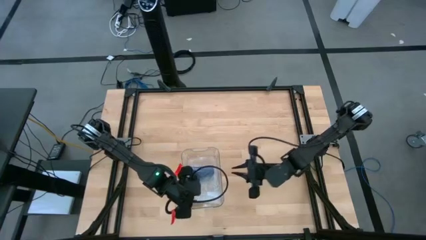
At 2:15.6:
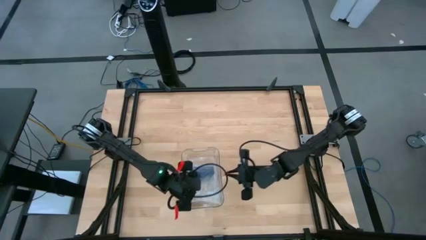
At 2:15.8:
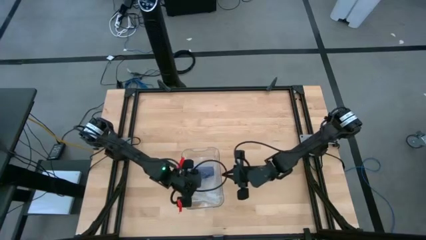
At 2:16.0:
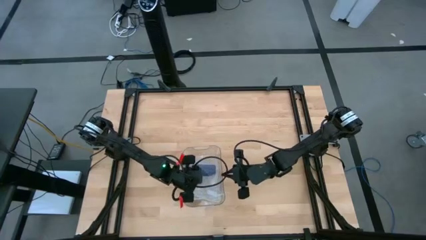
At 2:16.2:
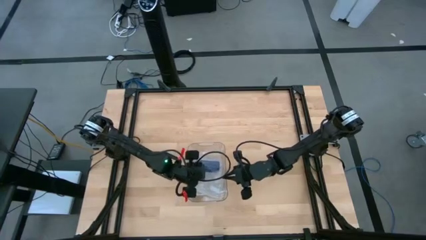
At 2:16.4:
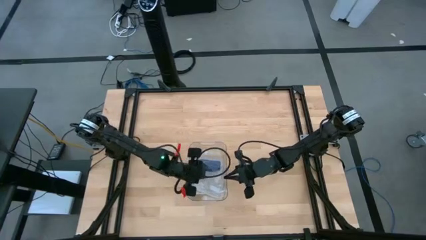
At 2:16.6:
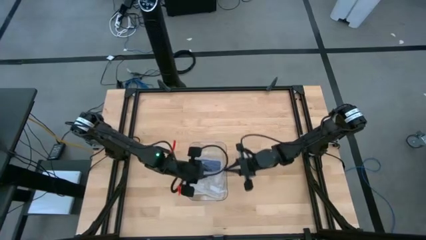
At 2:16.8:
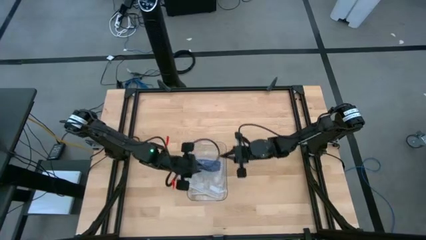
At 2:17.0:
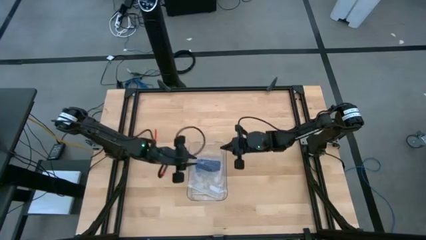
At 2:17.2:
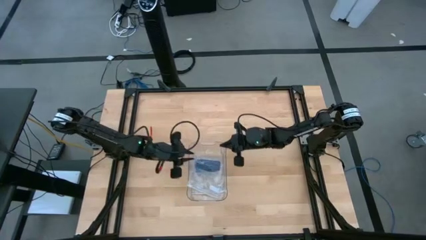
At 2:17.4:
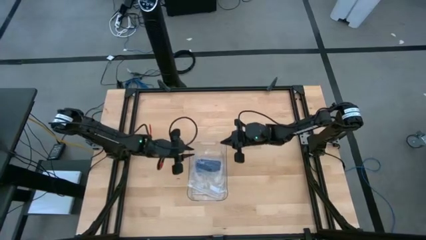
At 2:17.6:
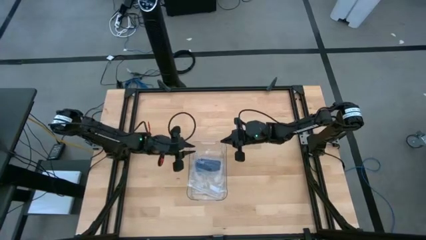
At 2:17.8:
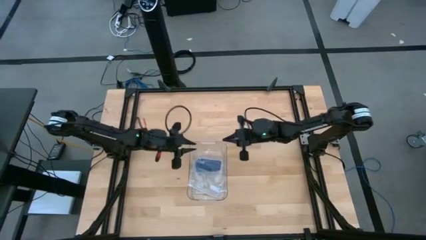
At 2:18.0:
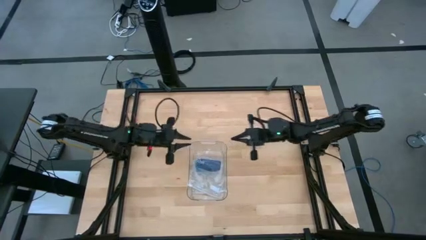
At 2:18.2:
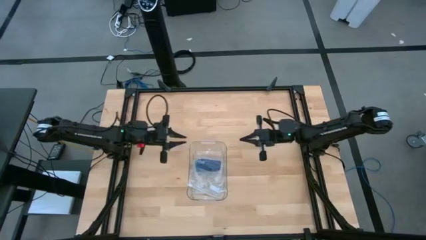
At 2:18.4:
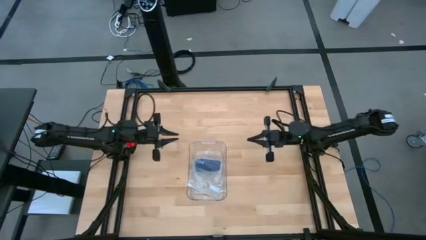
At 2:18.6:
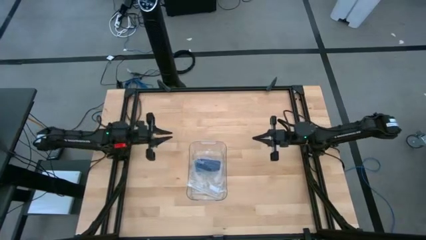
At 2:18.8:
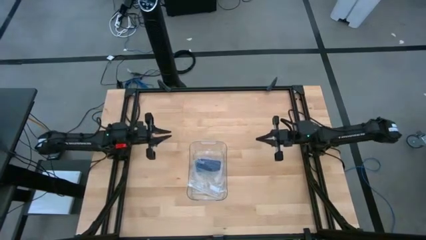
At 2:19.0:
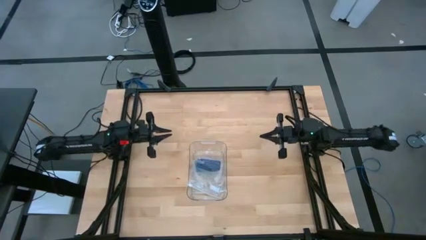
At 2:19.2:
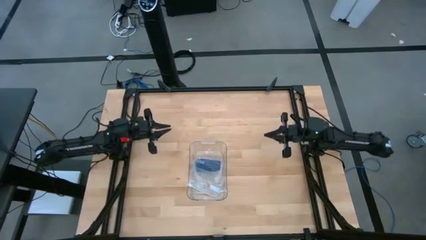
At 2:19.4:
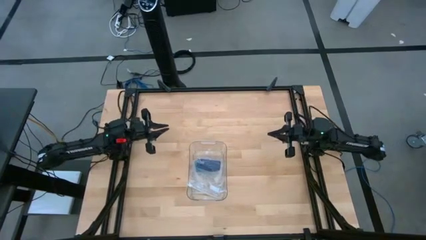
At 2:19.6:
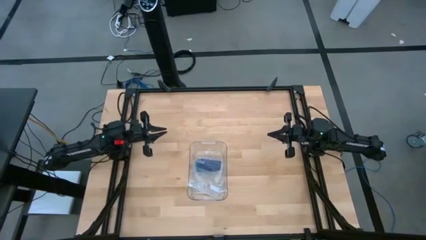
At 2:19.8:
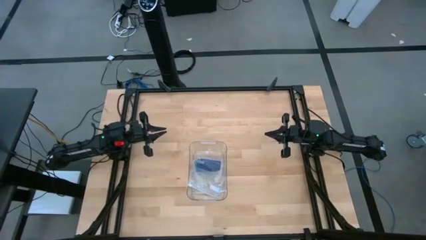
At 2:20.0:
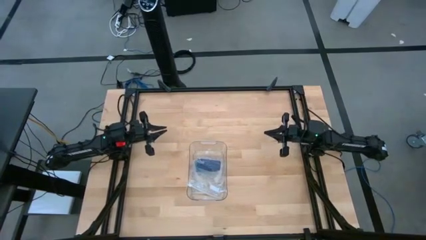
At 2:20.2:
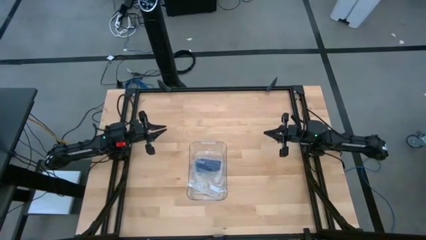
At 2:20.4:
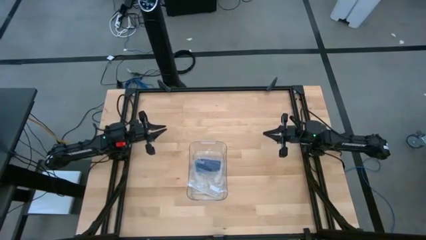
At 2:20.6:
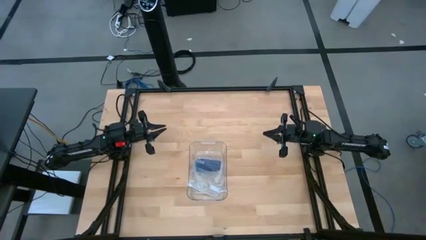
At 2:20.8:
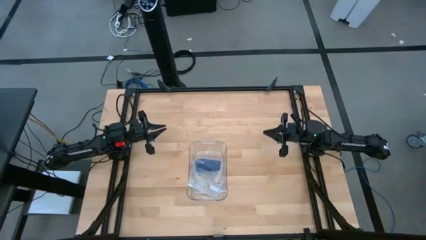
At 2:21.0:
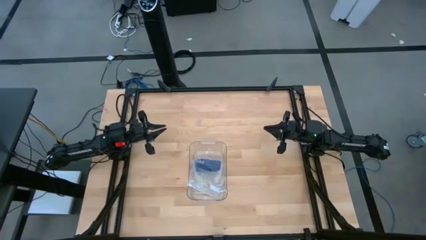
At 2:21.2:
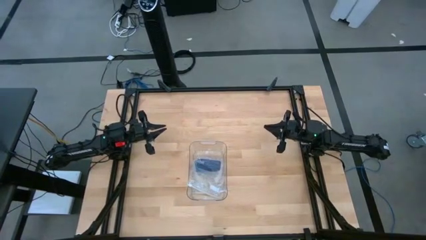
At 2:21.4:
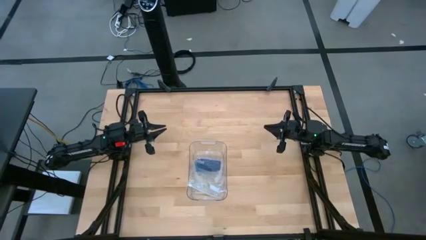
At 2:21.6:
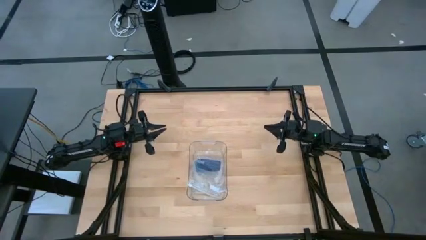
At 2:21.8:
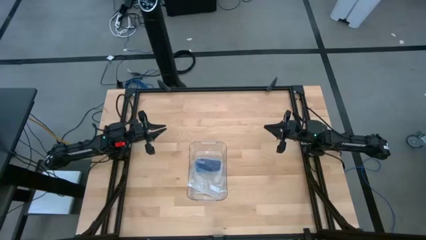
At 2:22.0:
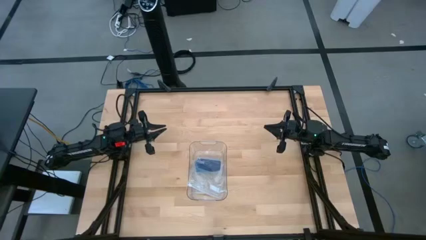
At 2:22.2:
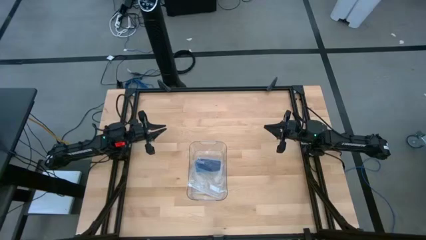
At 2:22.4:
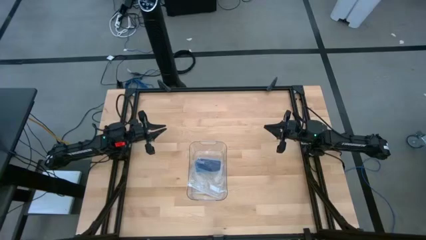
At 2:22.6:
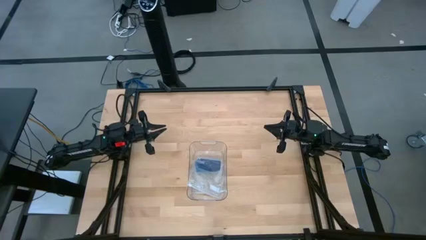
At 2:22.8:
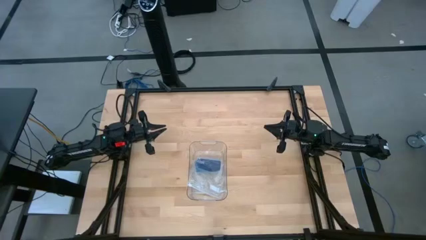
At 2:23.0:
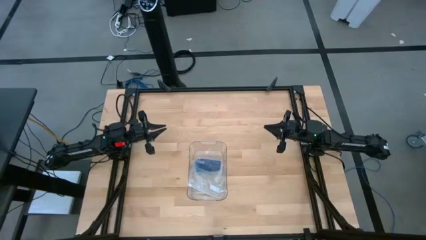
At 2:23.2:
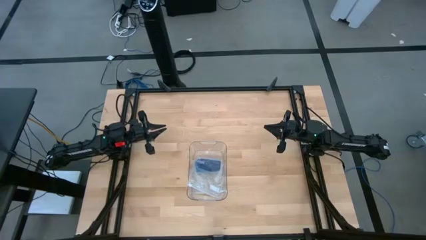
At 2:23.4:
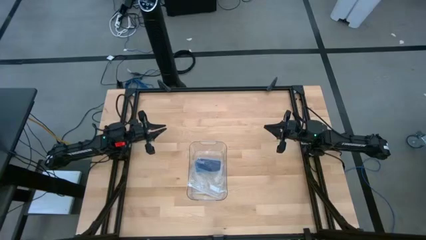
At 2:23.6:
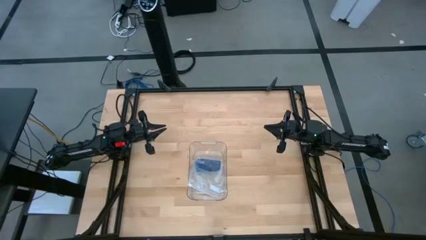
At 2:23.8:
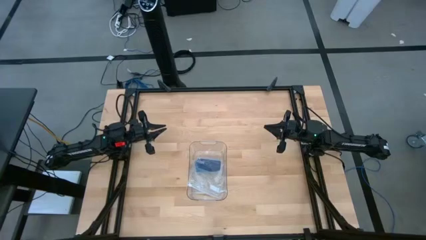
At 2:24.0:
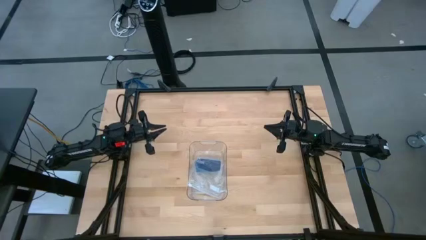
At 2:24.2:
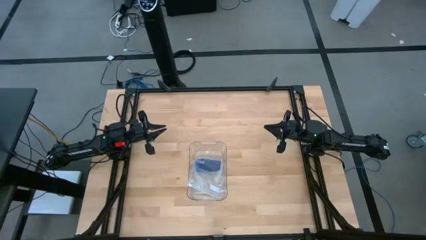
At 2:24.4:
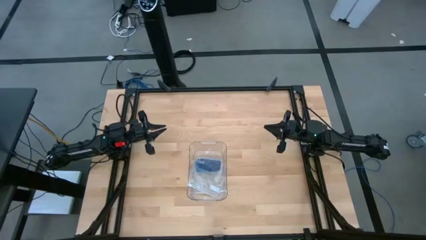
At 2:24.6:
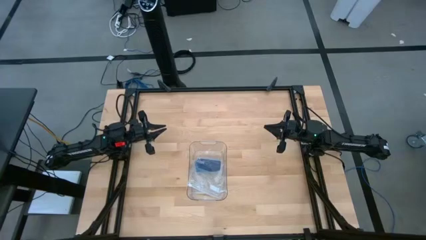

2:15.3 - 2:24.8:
Task: Roll bandage
Return to Home Position

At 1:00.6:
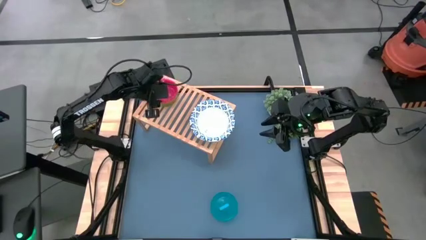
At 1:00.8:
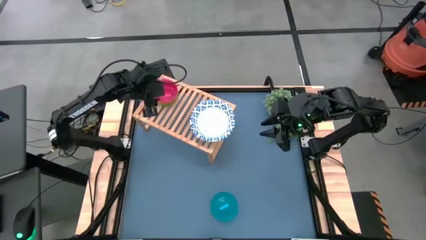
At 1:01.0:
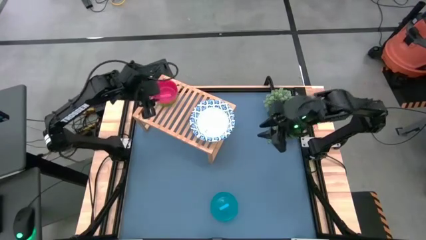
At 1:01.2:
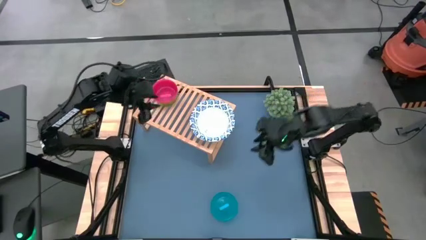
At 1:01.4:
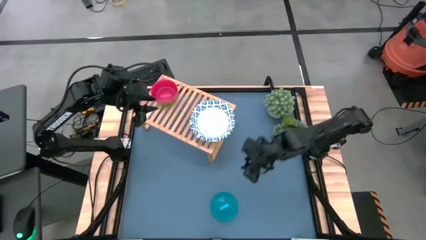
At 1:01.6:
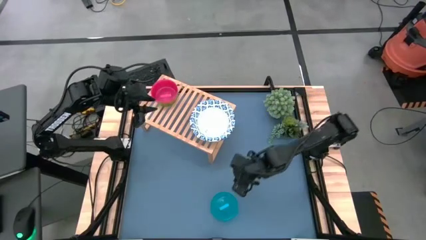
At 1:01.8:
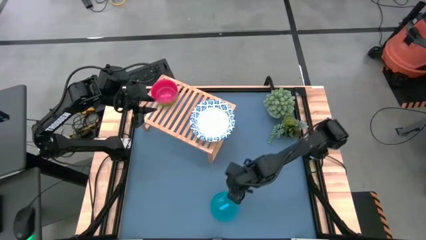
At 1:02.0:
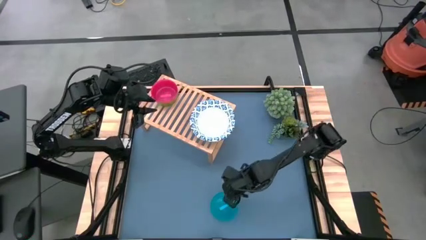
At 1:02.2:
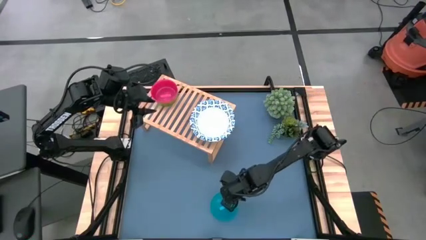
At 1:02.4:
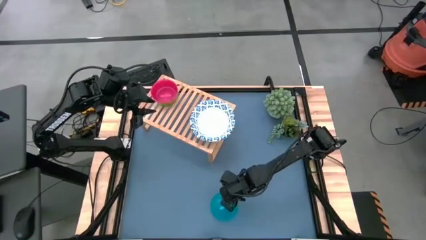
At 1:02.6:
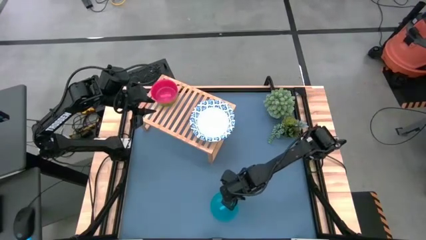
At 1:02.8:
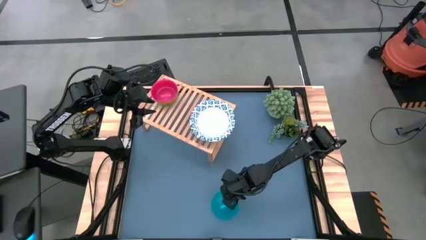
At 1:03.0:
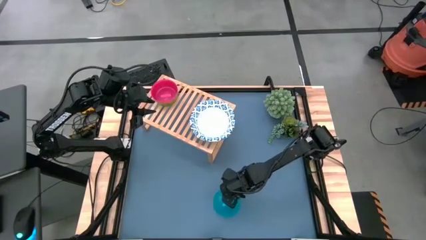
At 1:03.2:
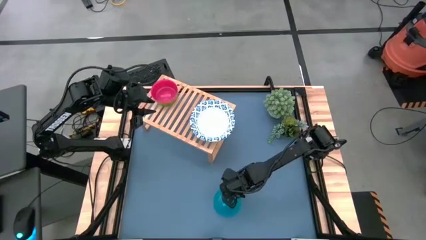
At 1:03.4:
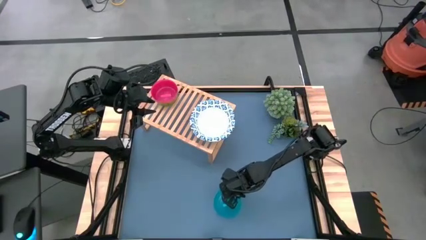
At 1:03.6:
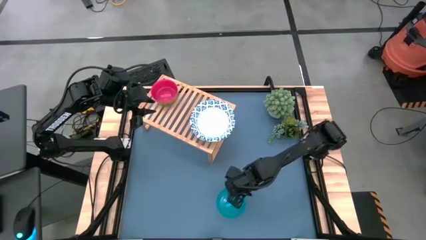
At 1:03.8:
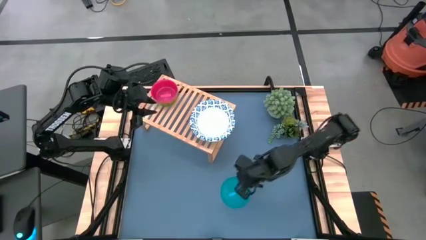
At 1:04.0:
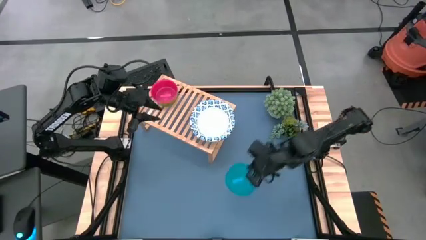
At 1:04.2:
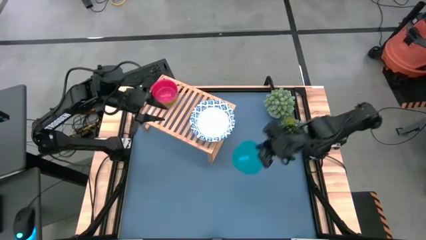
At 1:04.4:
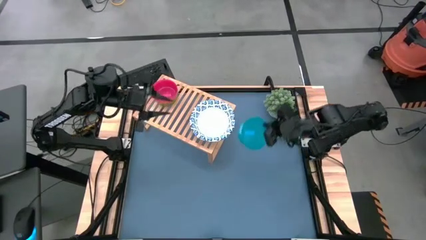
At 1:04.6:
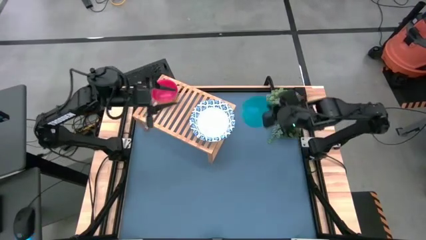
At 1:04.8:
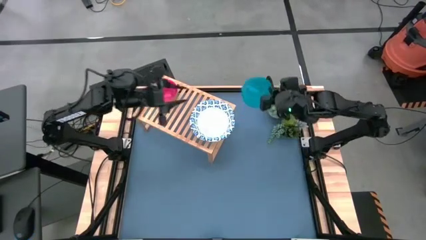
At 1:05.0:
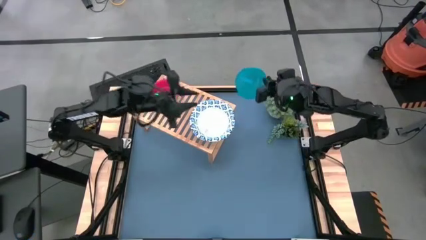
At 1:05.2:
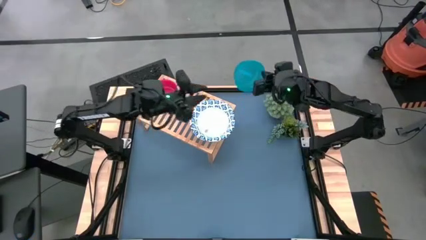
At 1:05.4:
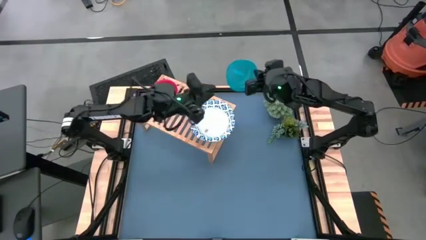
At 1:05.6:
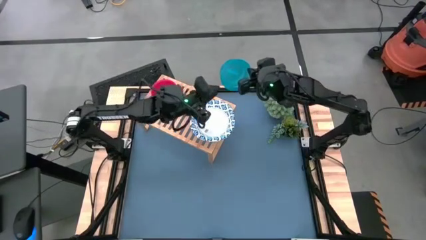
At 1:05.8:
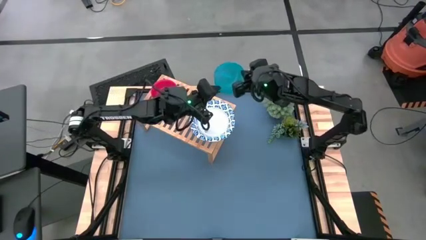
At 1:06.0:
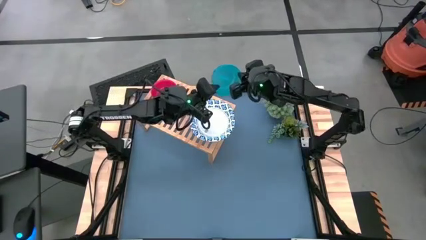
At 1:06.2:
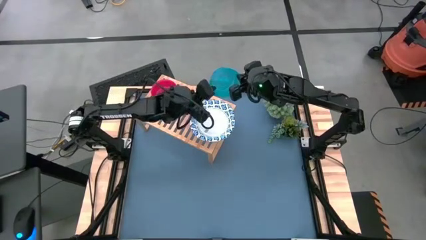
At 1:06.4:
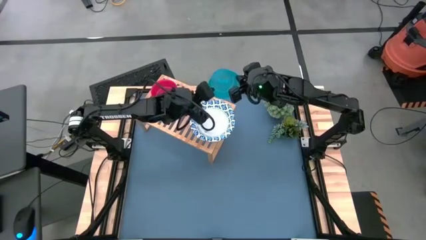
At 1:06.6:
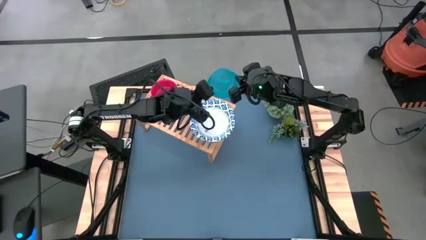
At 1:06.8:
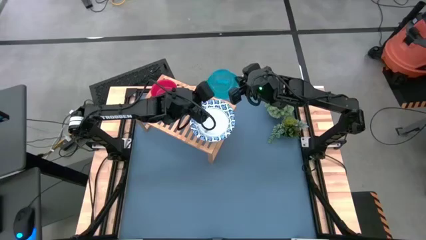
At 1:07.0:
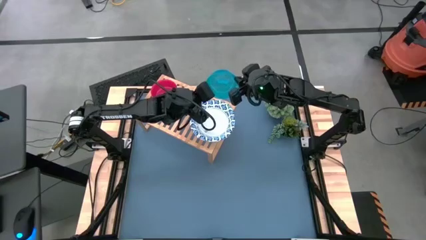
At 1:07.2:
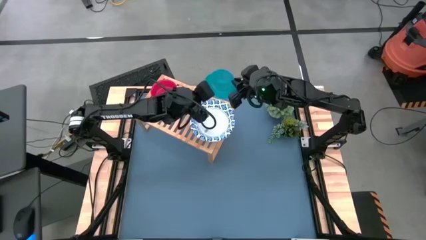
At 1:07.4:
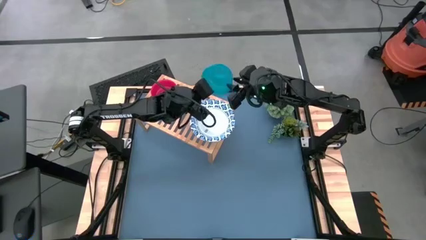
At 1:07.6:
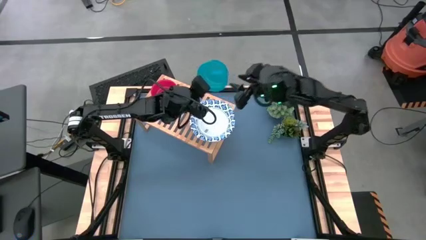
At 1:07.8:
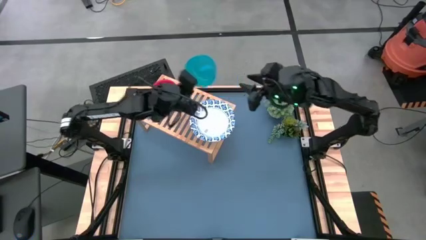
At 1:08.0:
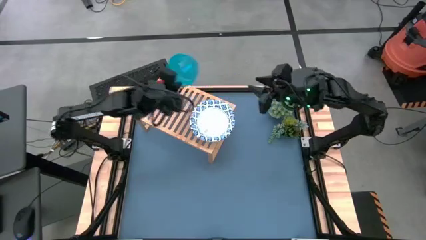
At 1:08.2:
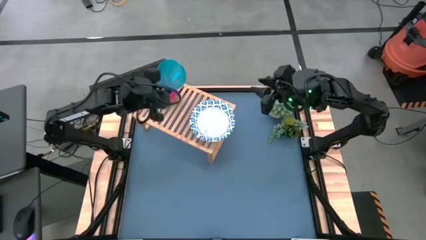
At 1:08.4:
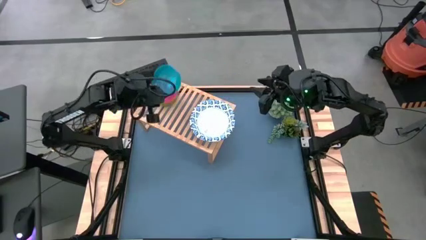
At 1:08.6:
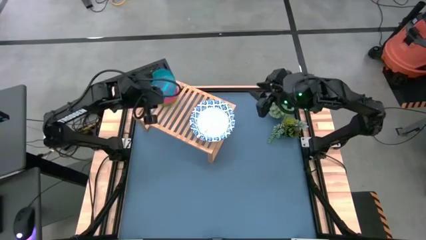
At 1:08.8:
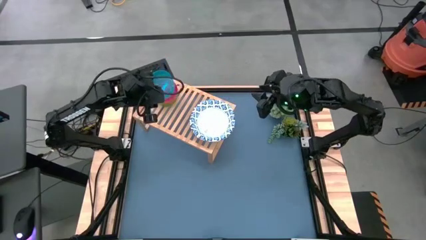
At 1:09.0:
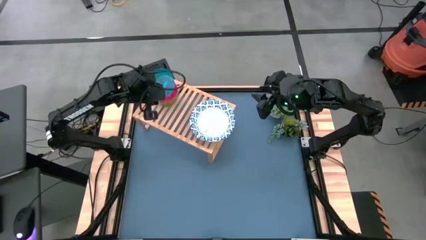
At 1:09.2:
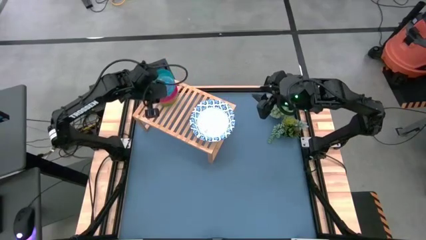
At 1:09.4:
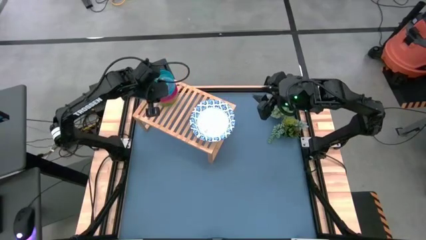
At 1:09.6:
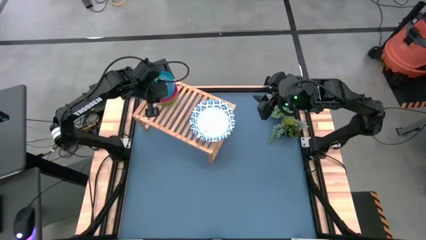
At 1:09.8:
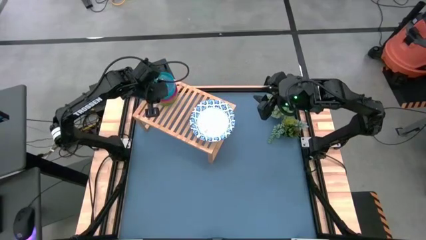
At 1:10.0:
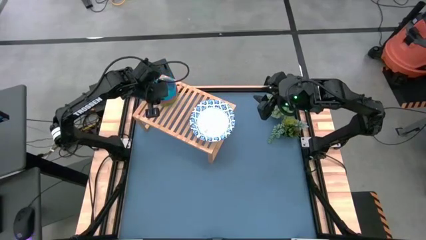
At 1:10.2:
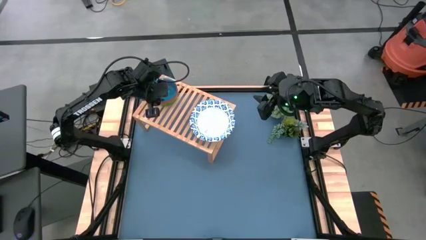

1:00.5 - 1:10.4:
Task: Place and stack bowls onto a shelf
Stack the blue bowl on top of the pink bowl on the shelf
